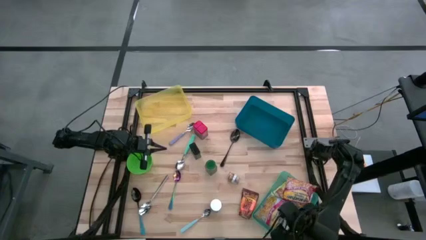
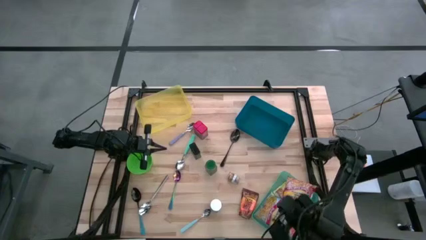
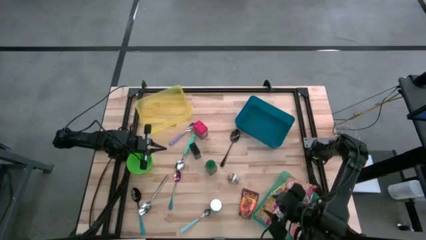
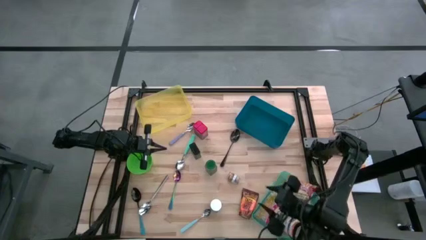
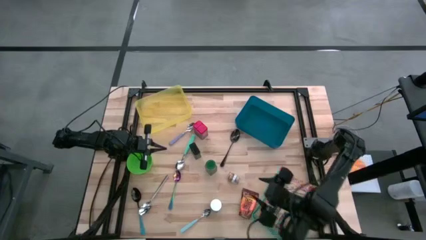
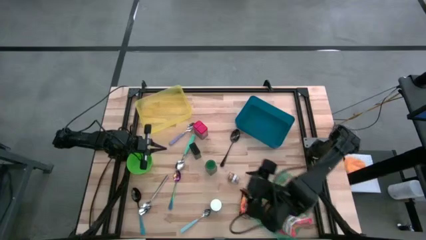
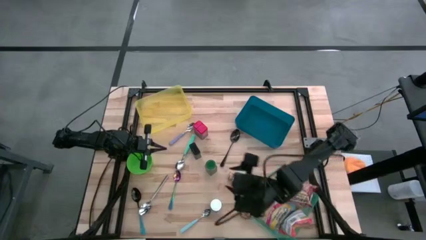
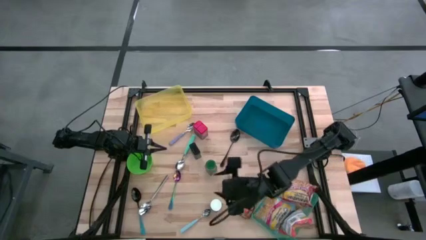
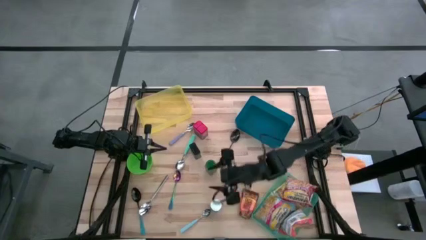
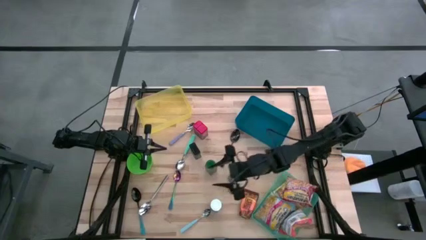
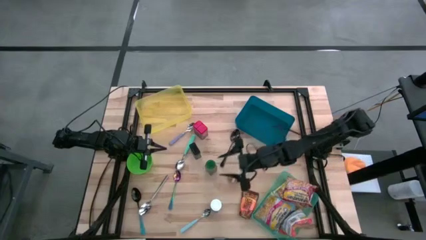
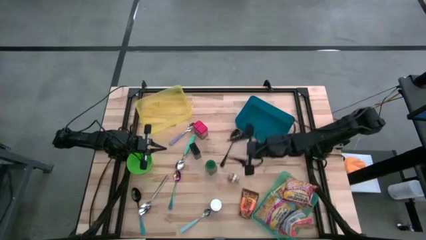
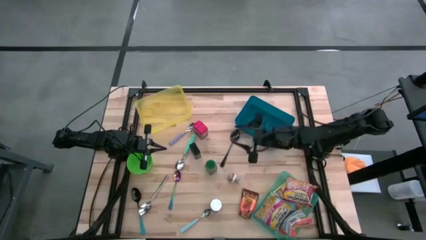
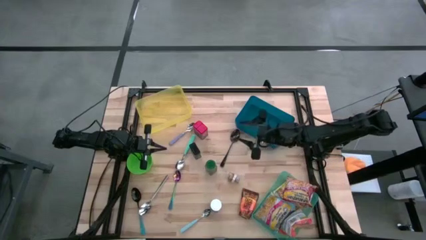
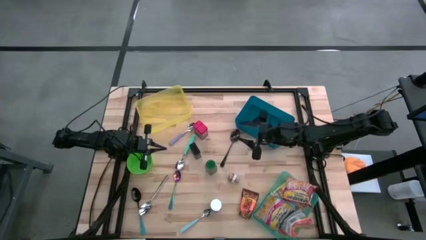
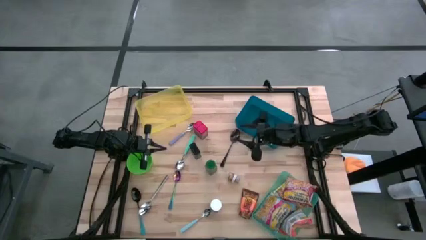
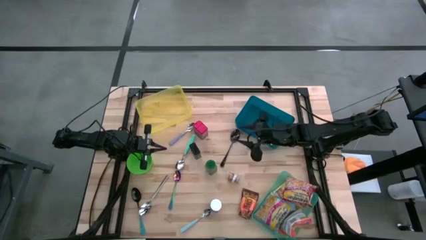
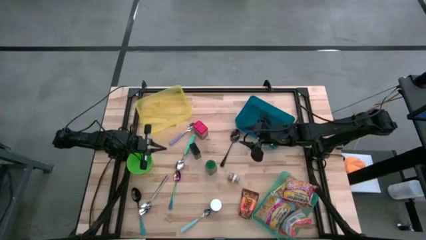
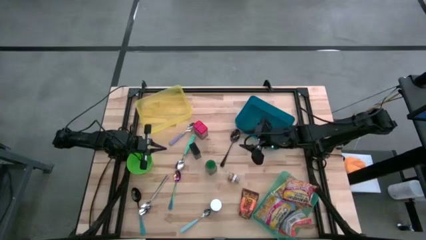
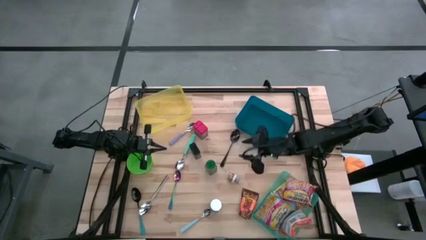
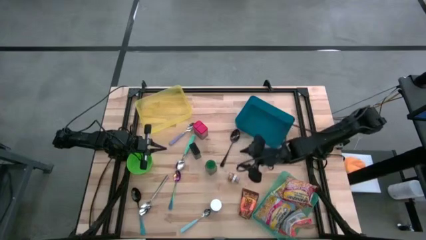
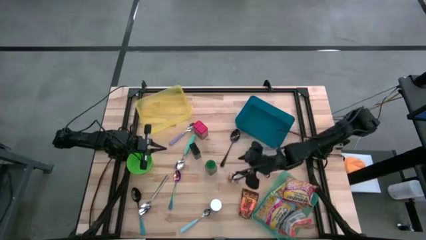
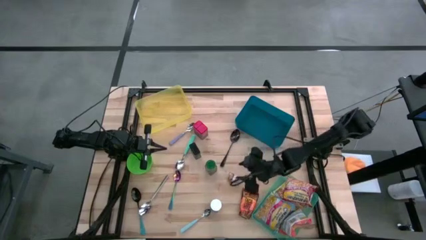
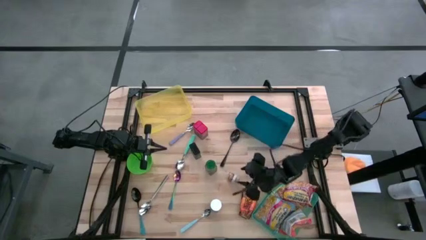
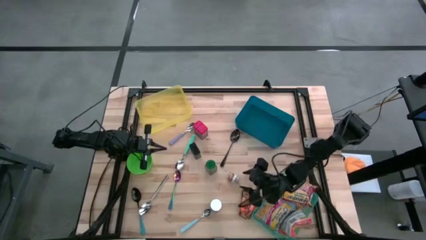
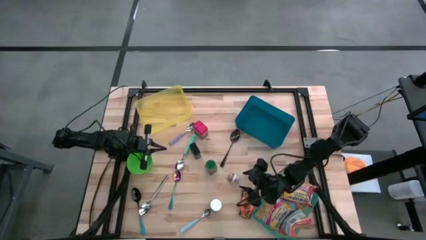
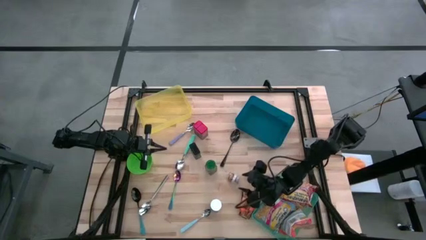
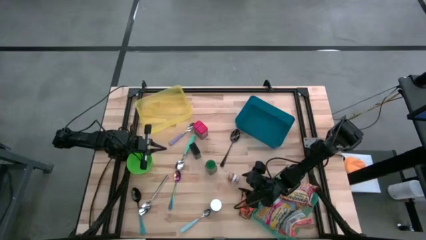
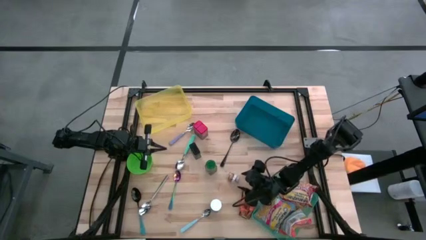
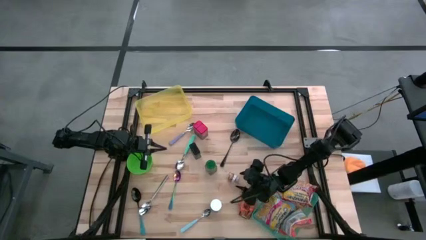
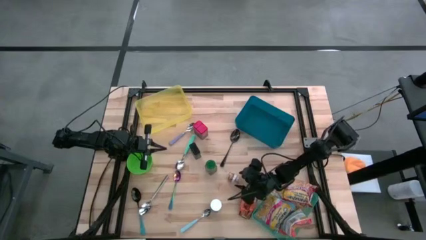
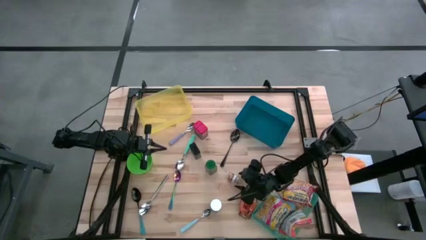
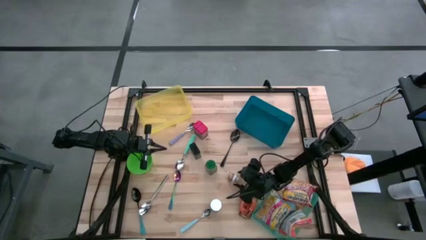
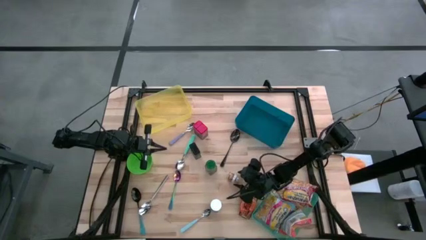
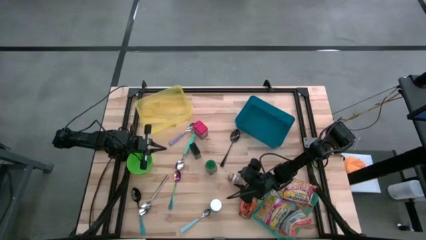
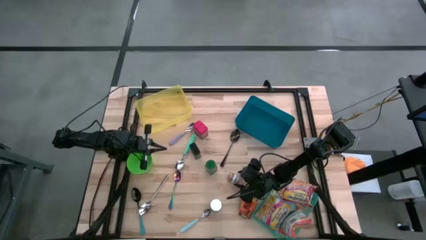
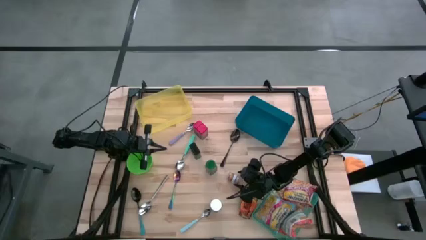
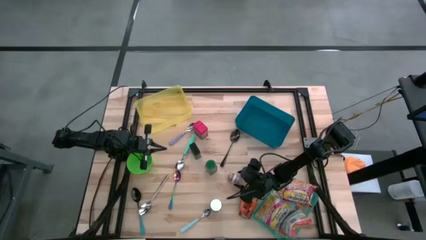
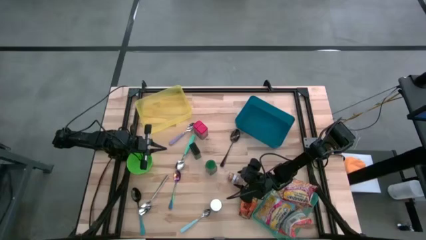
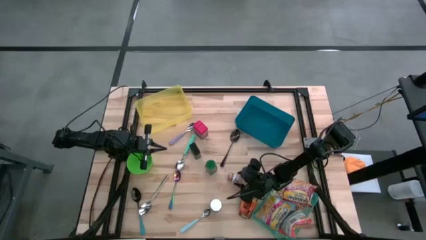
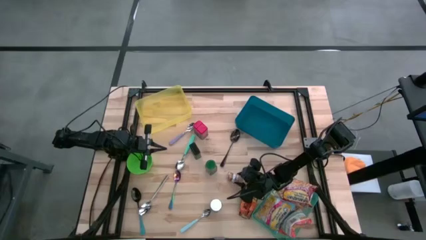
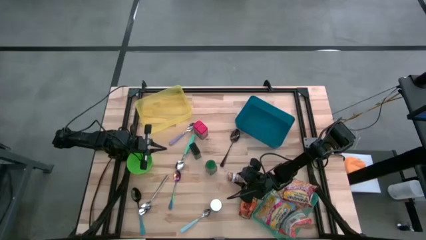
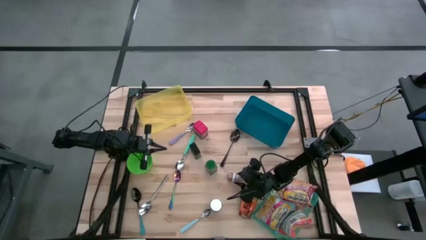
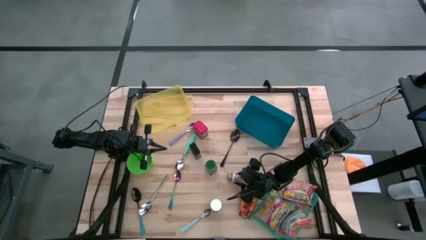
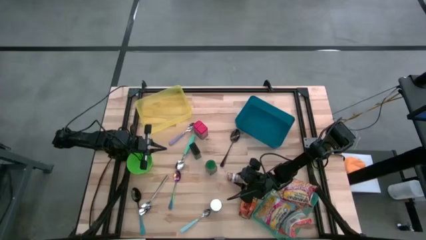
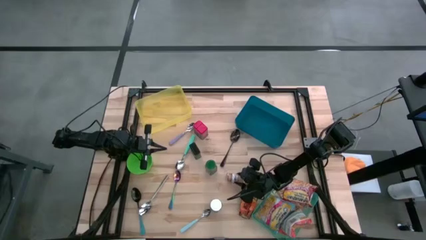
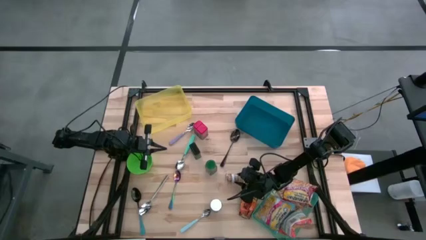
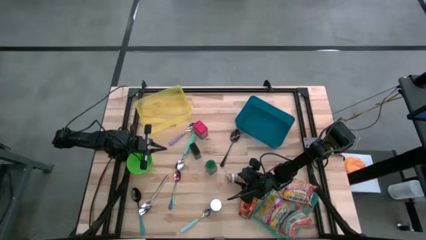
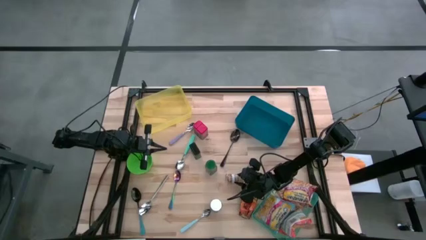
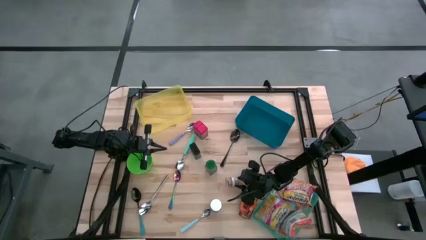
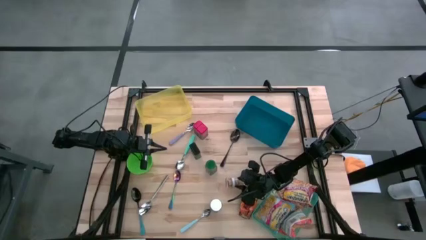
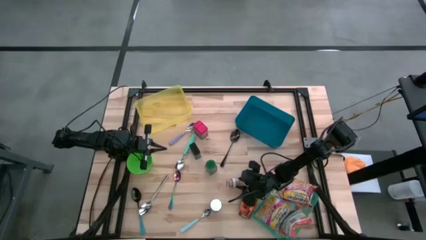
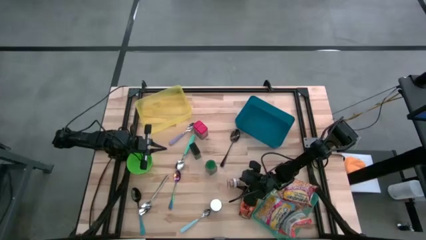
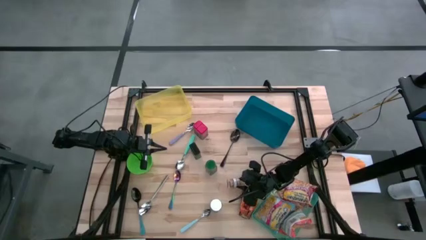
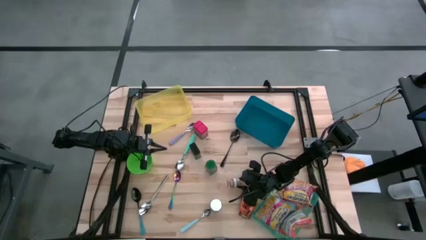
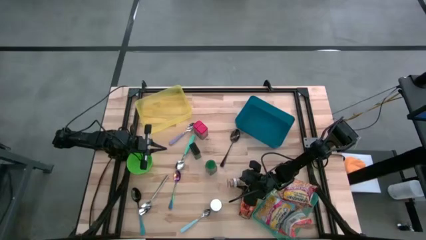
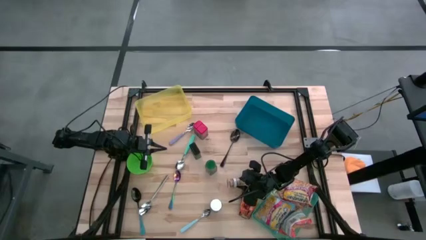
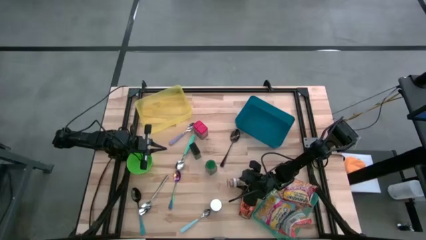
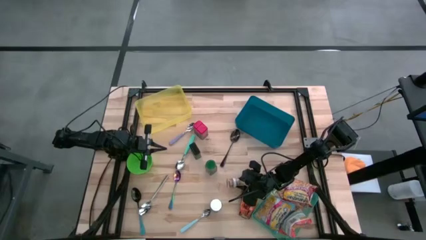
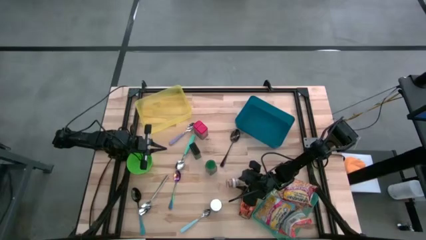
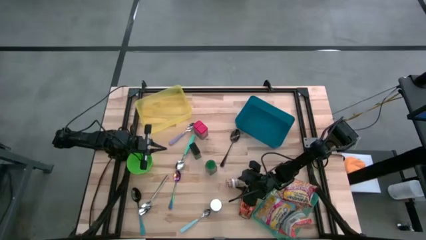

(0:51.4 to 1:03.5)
Put the brown seasoning bottle into the blue bin
